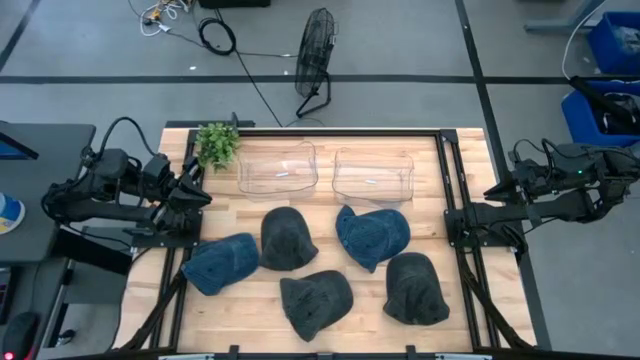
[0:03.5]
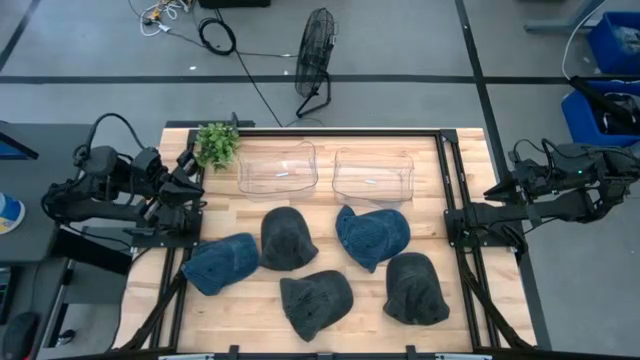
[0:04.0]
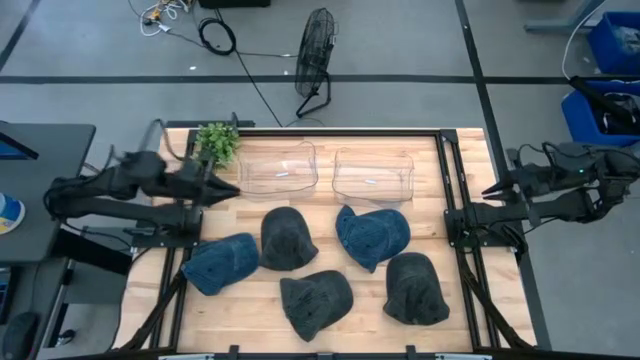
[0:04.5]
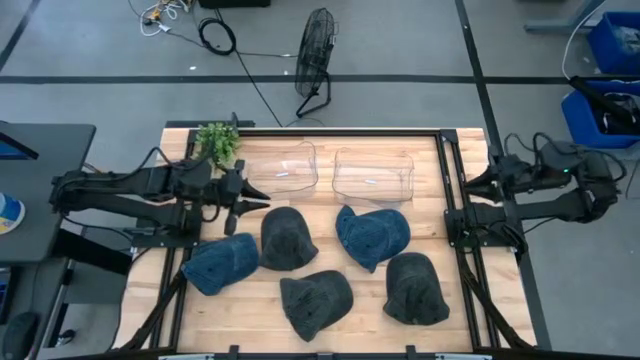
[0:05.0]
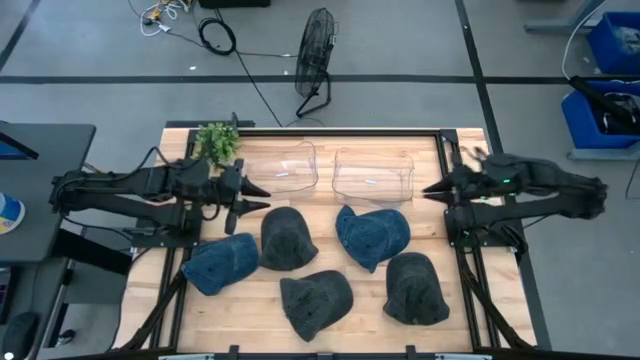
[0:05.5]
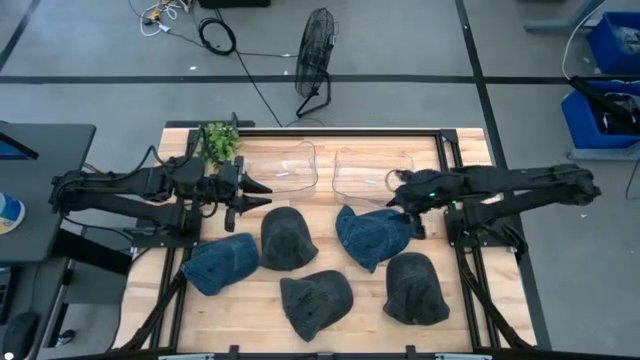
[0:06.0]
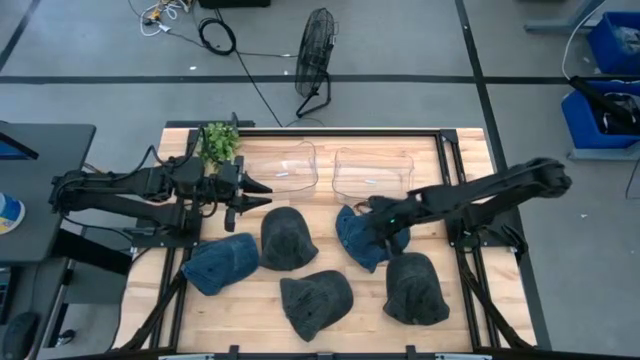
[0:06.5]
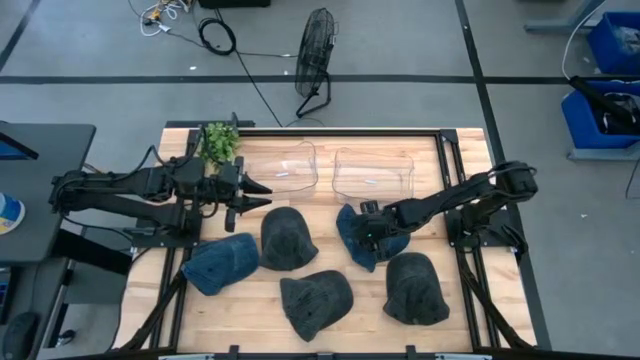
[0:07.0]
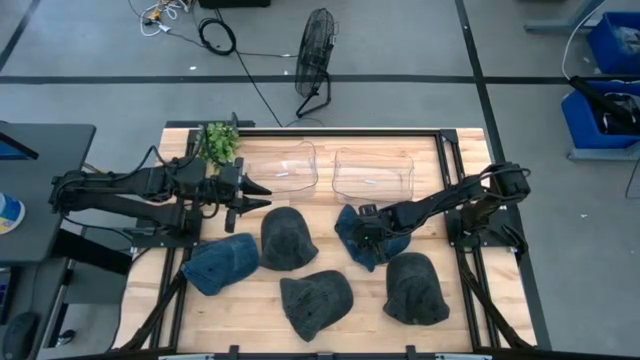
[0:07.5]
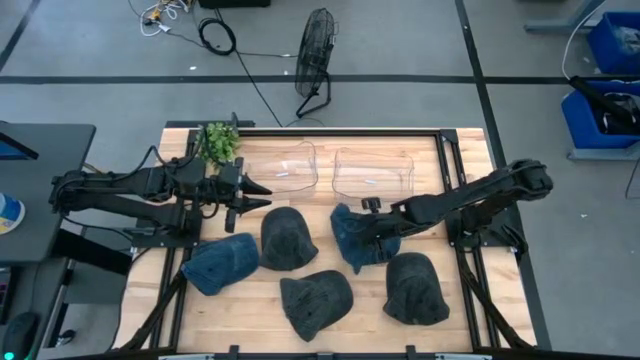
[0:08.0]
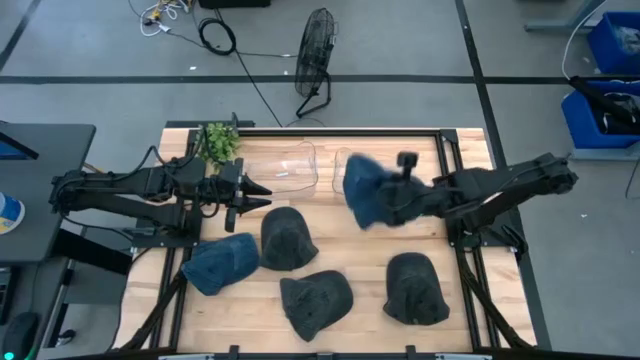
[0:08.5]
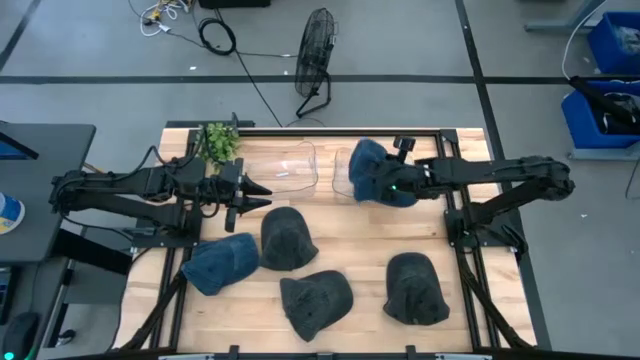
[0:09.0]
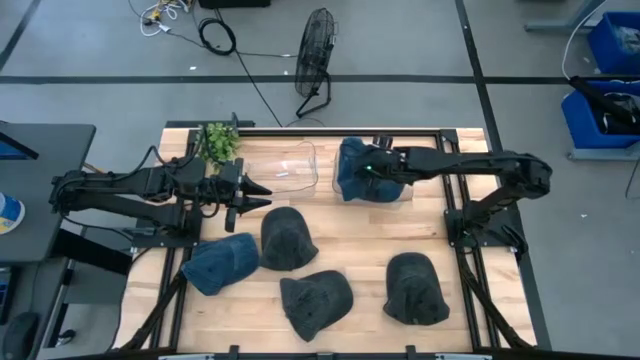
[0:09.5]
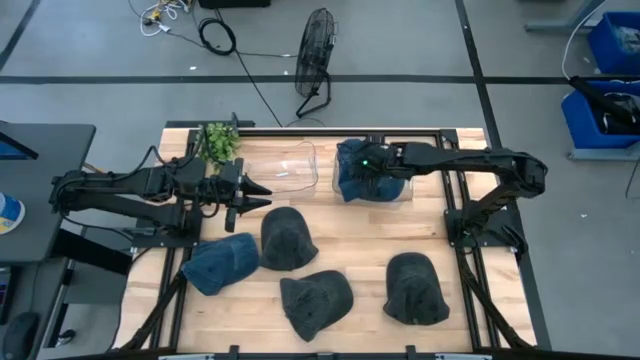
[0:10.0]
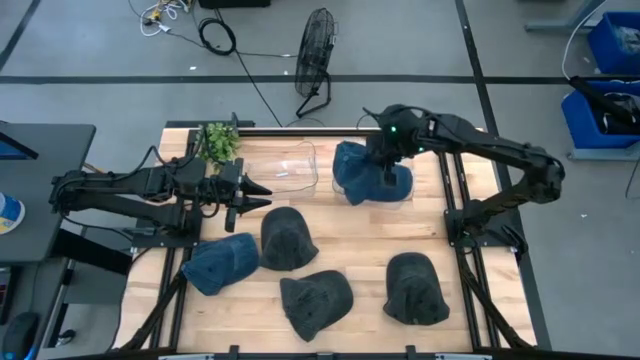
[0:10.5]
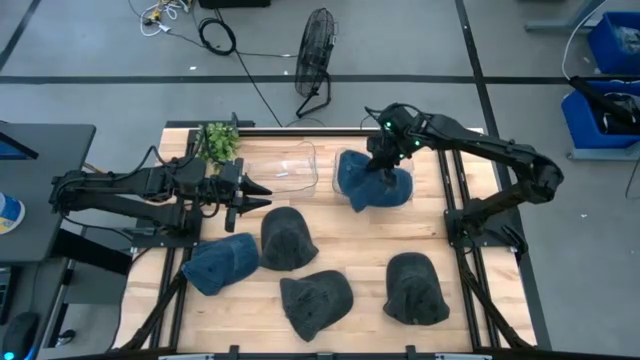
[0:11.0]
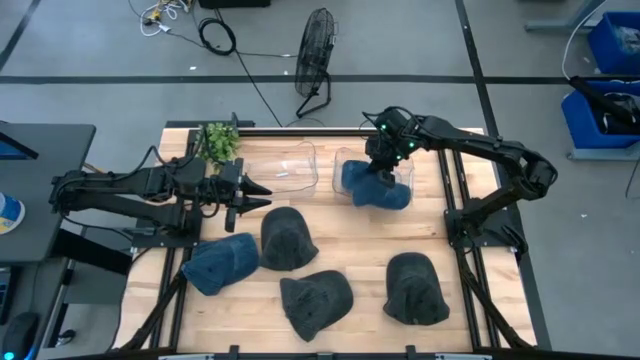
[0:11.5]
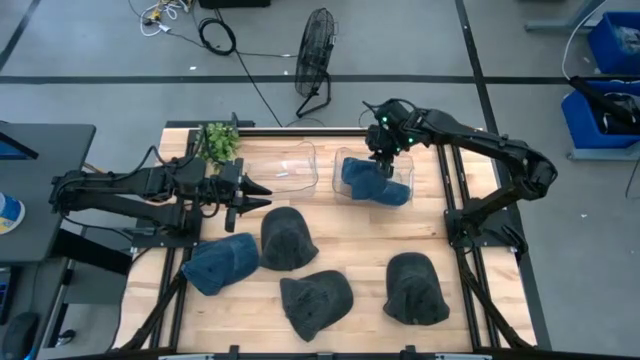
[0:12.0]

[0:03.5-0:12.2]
Task: Pick & Place hat
Put the right blue cap into the right transparent bin

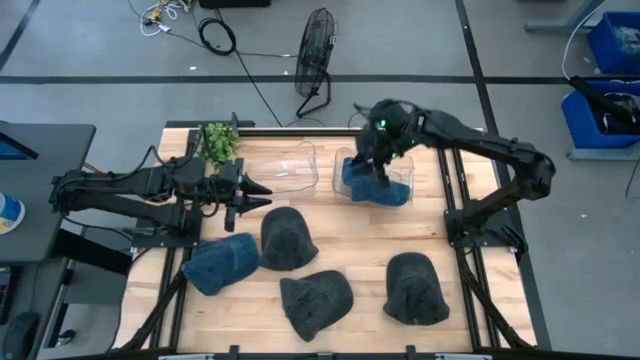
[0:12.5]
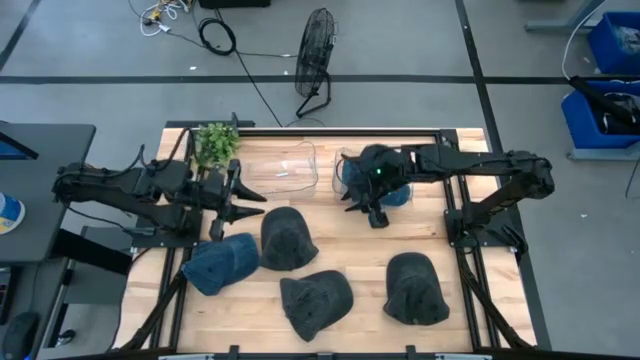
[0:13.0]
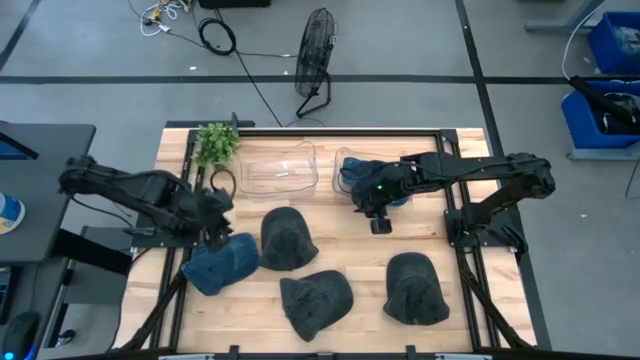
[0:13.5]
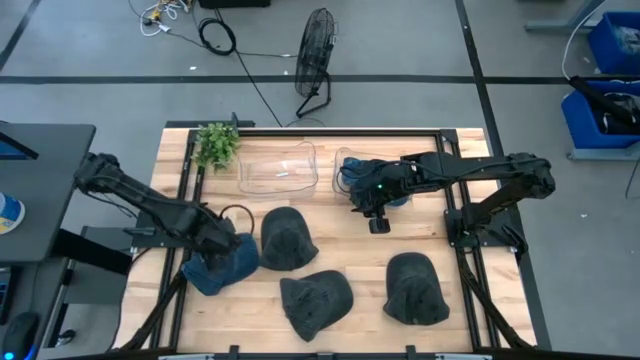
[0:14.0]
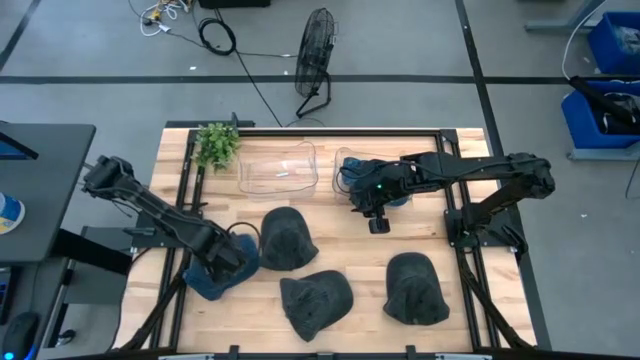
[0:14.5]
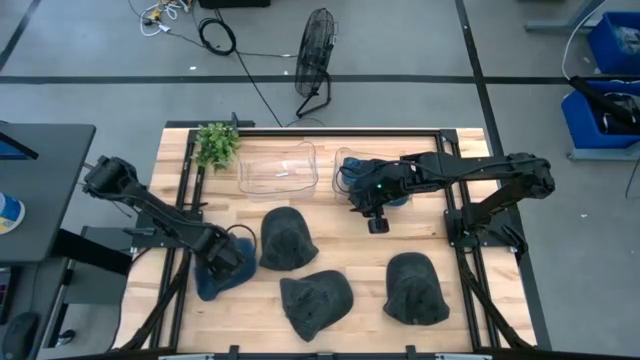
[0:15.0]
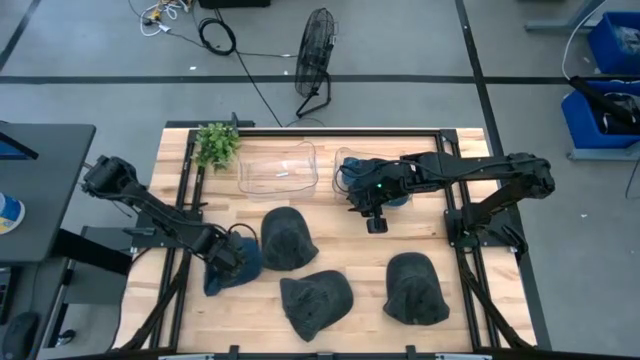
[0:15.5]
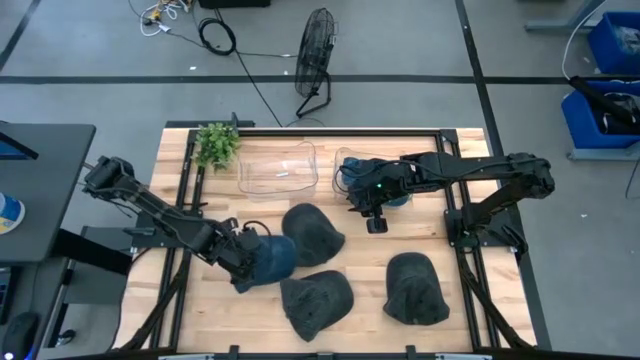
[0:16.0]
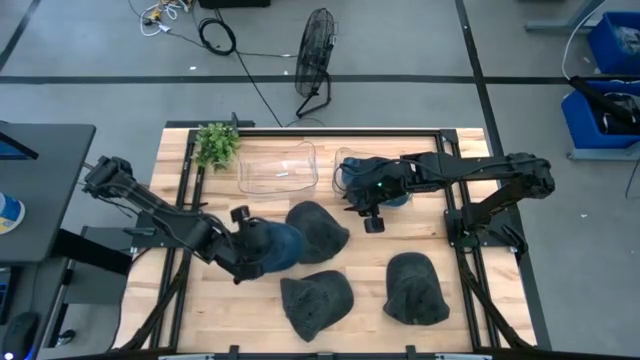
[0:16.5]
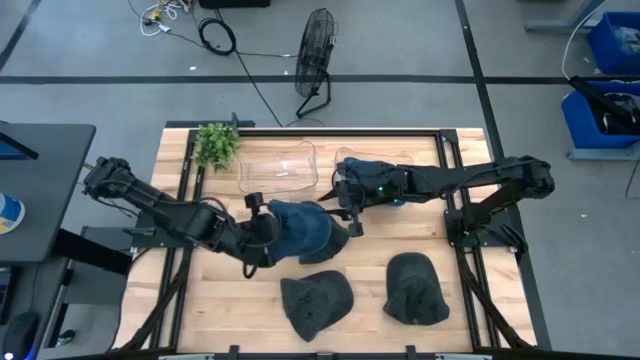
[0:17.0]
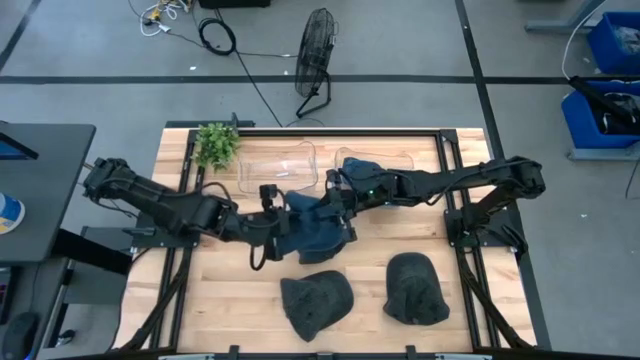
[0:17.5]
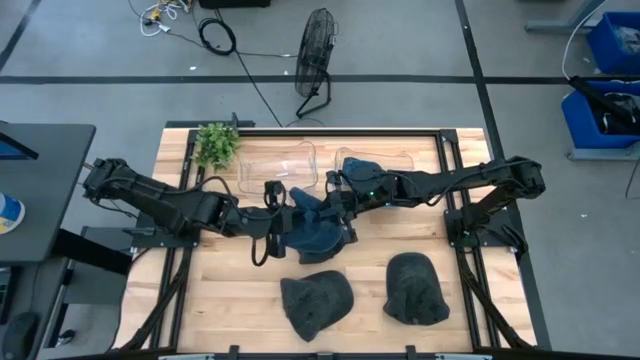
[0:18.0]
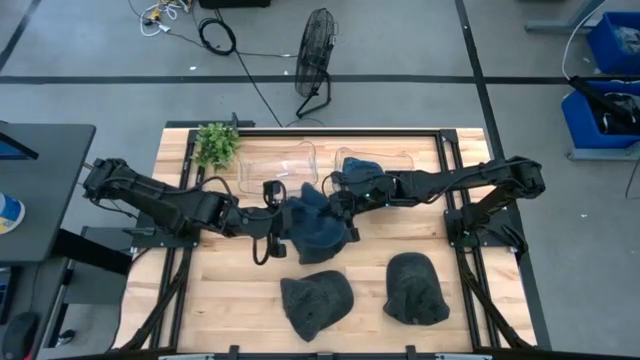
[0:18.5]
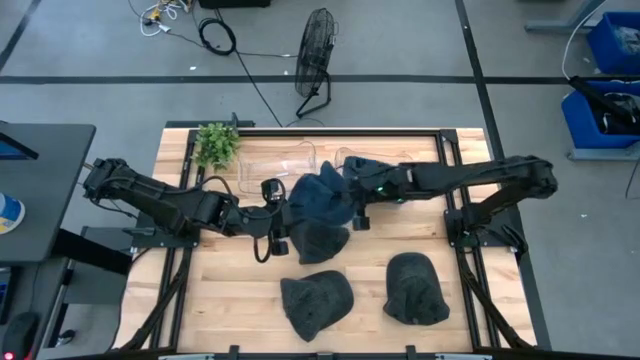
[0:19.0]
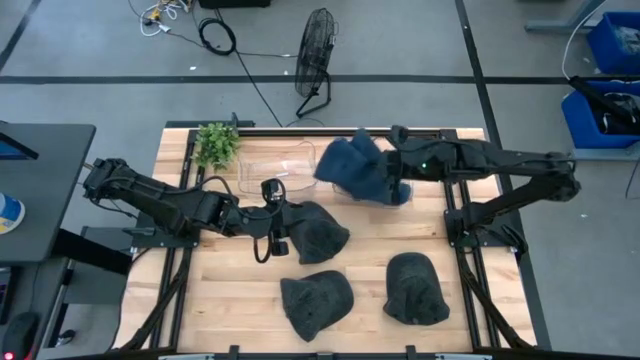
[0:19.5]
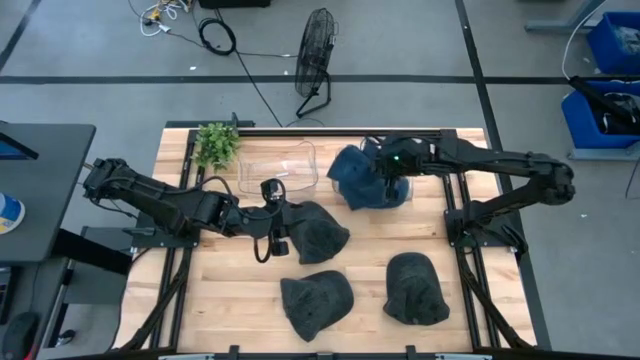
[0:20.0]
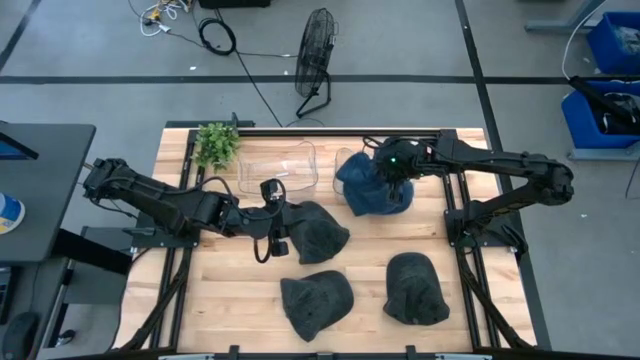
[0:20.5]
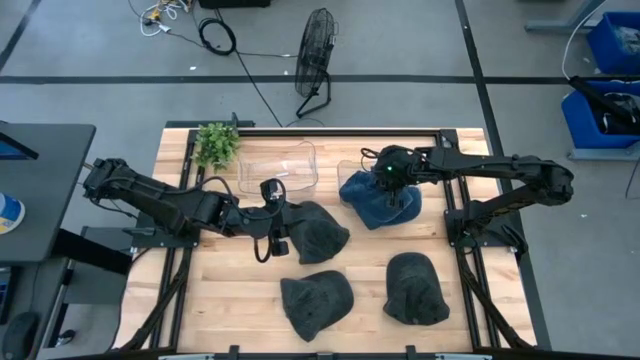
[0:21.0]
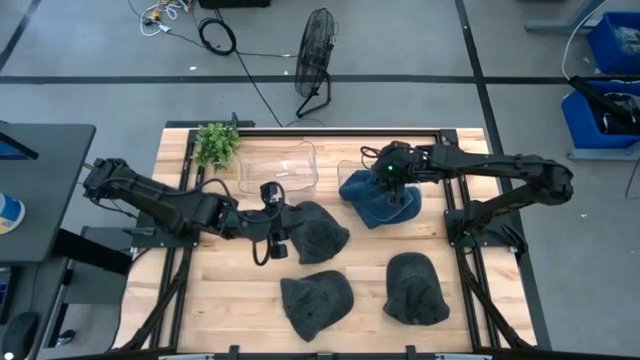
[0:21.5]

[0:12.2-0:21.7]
Put the blue cap into the right transparent bin

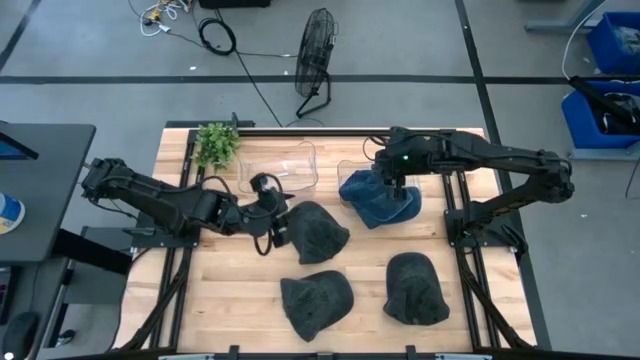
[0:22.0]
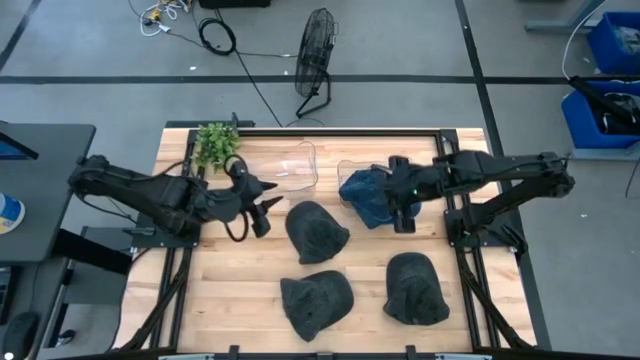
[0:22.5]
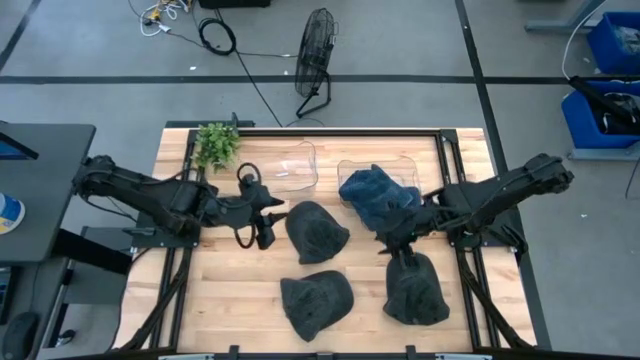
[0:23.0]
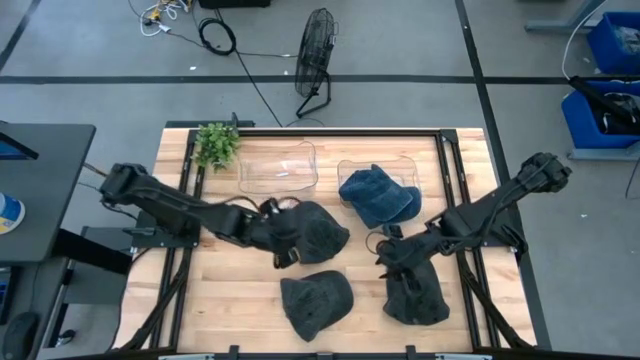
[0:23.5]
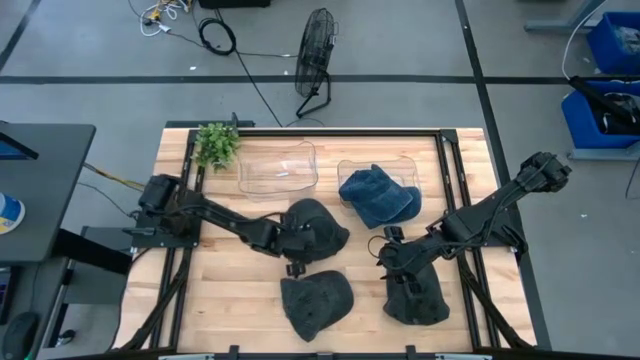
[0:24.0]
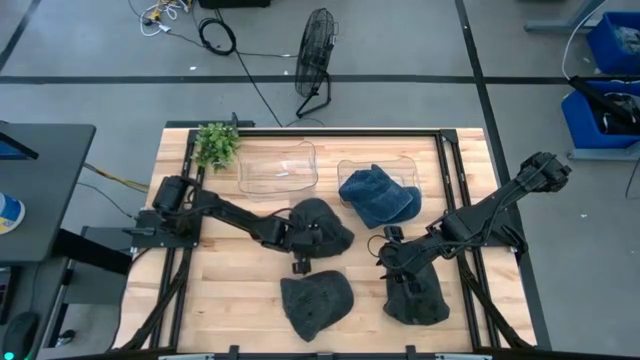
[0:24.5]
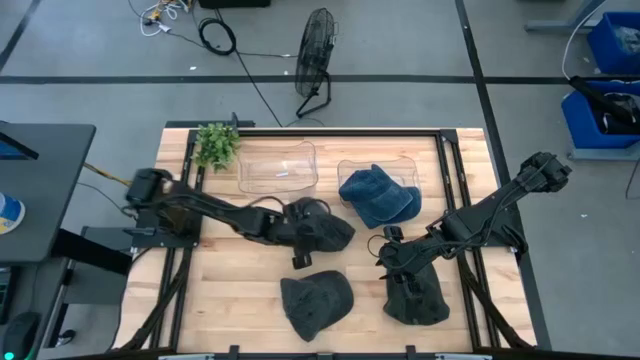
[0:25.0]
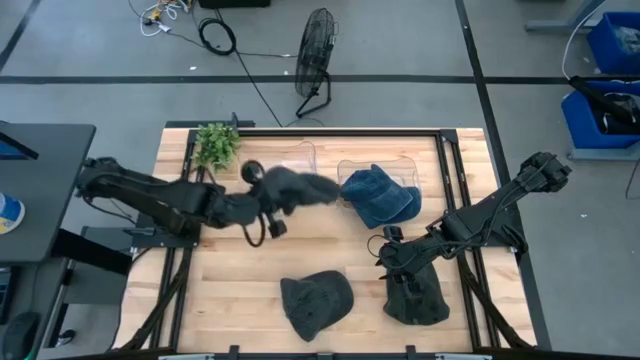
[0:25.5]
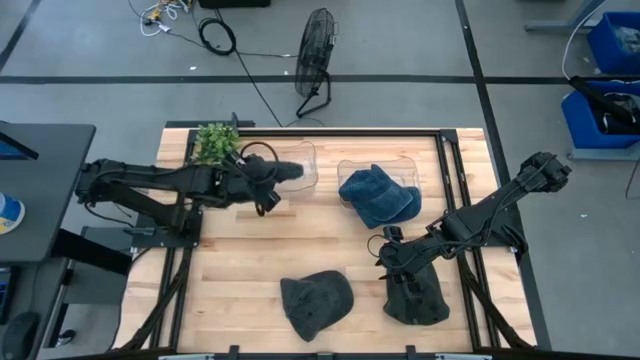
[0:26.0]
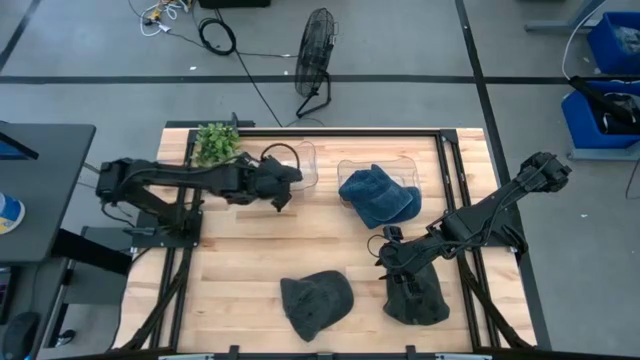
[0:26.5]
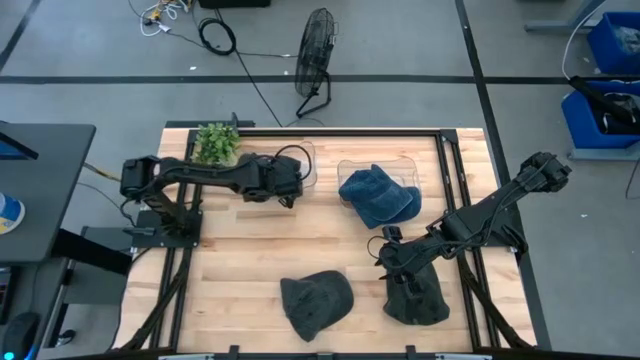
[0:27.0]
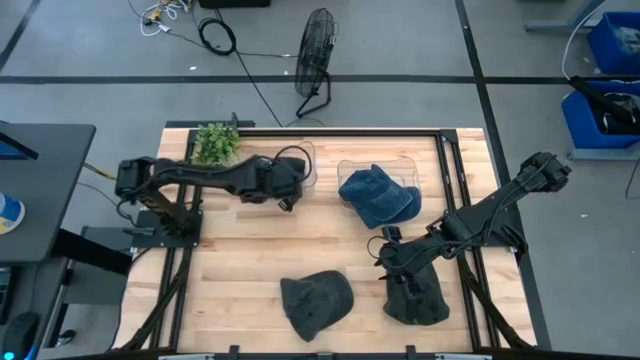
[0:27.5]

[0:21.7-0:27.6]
Put the top black cap into the left transparent bin
